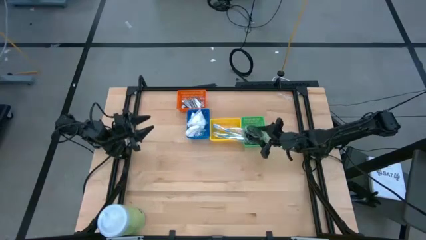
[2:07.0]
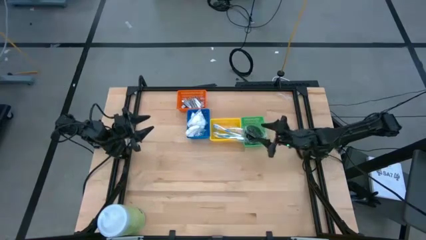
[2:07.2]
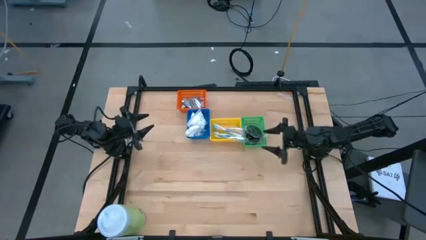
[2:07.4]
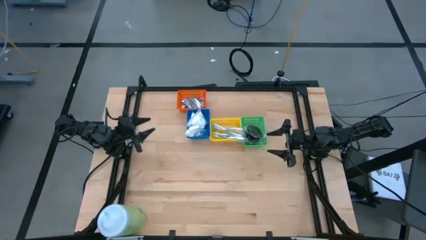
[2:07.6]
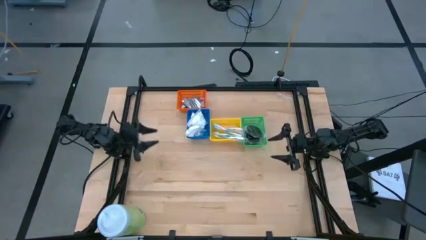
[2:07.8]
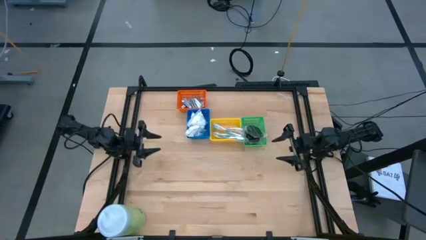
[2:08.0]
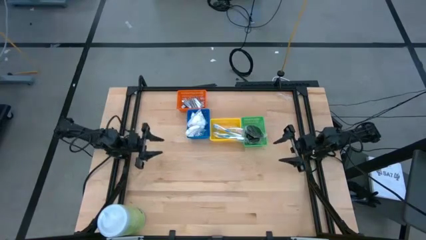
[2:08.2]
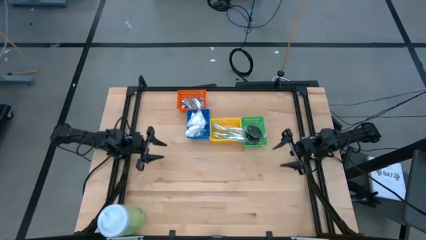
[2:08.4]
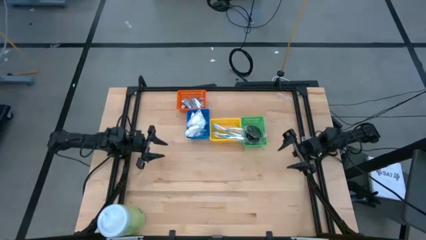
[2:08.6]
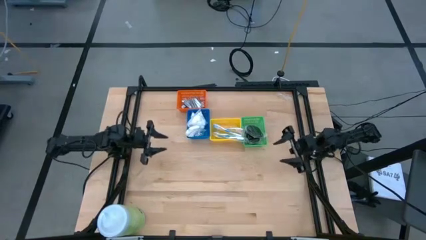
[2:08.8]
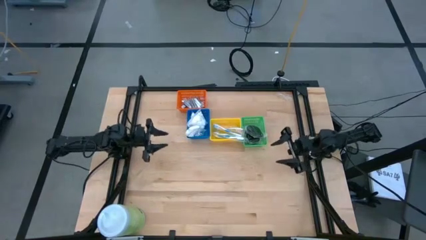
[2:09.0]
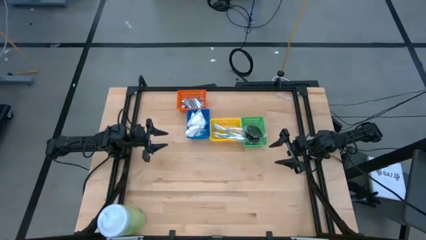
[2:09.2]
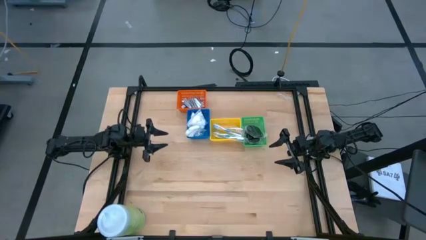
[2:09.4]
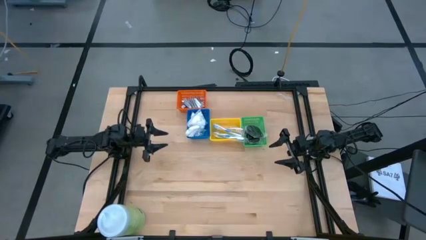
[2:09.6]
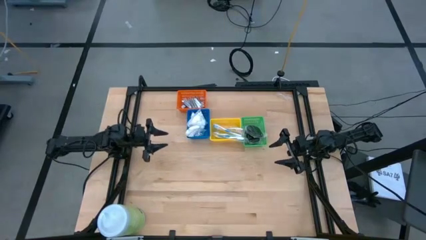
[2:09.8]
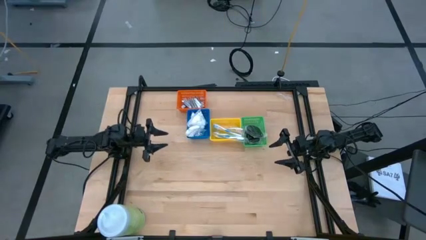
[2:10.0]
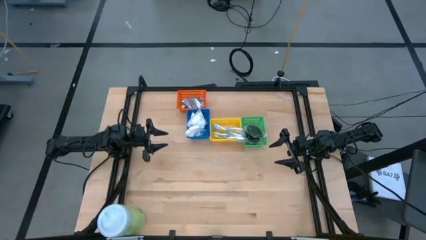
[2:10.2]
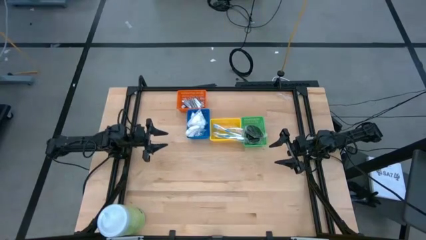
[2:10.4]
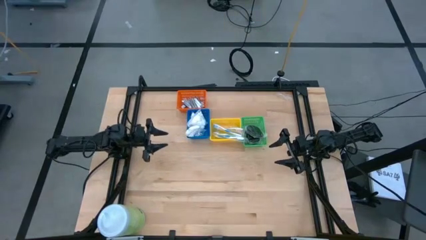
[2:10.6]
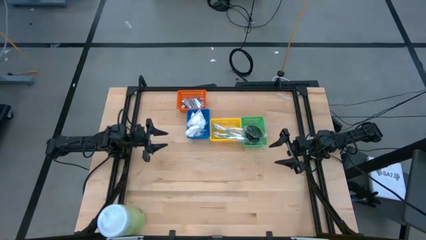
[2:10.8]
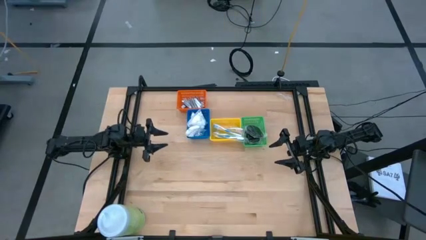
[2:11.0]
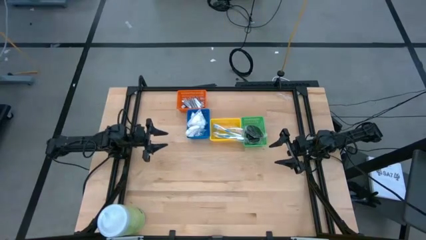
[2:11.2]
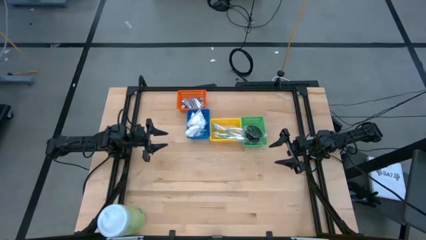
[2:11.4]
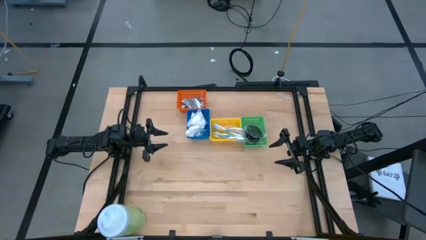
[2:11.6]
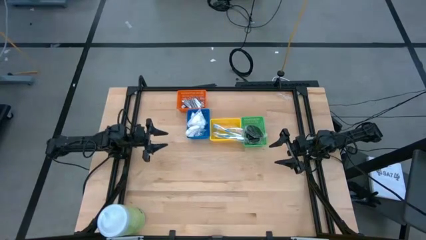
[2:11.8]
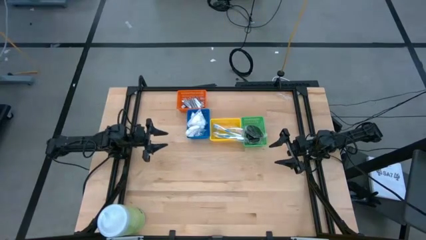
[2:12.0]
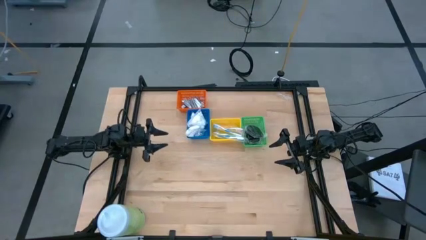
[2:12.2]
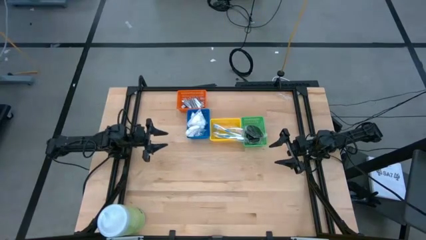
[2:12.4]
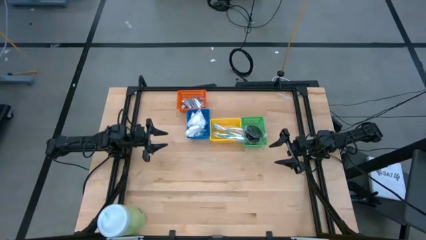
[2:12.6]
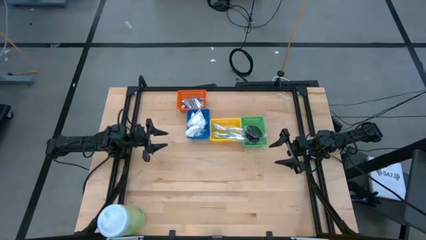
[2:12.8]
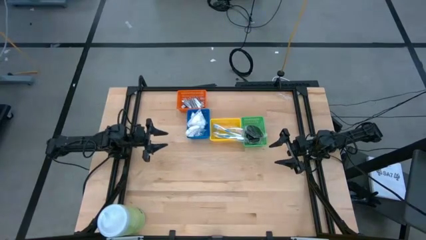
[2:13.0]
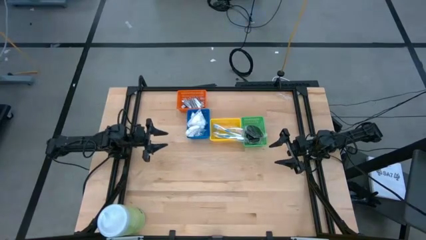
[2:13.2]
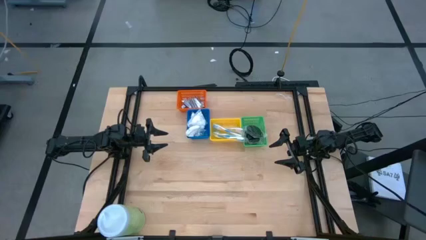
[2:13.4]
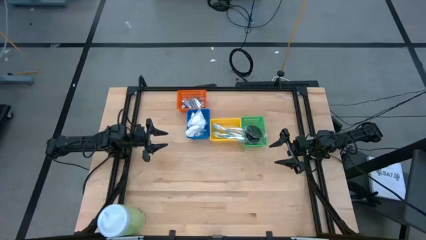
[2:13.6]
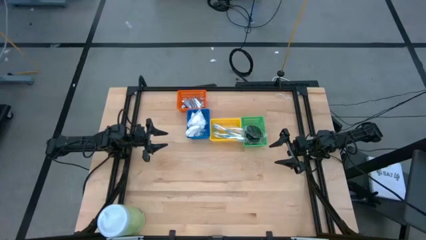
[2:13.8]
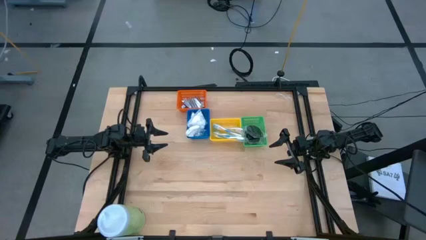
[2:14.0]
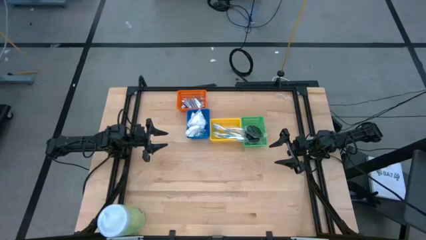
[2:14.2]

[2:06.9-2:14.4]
Task: Pick & Place Travel size toiletries
Return to Home position

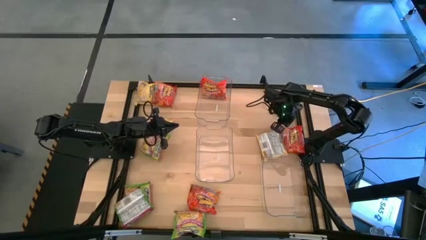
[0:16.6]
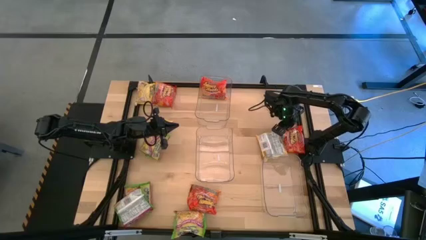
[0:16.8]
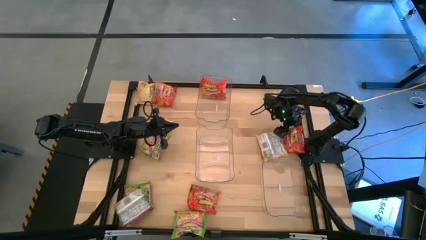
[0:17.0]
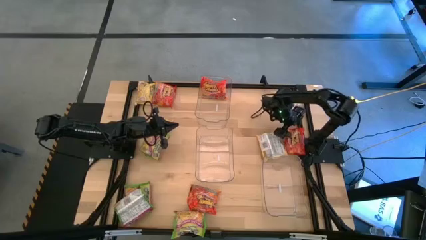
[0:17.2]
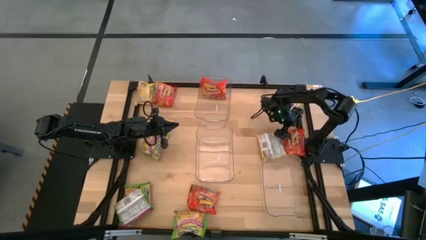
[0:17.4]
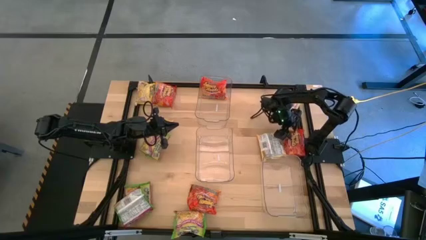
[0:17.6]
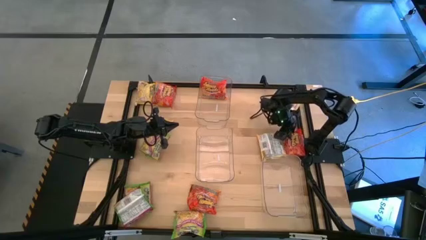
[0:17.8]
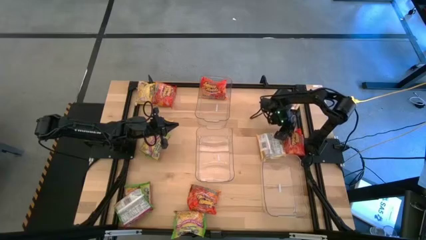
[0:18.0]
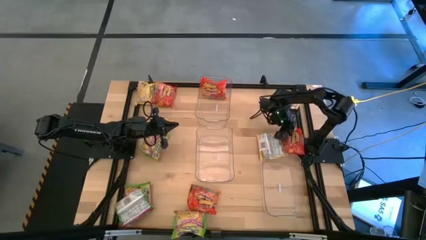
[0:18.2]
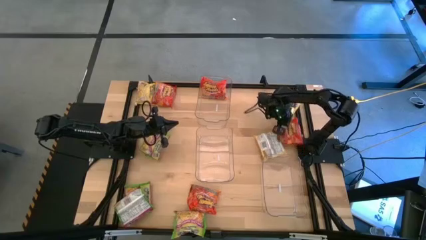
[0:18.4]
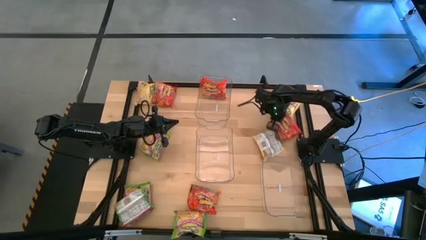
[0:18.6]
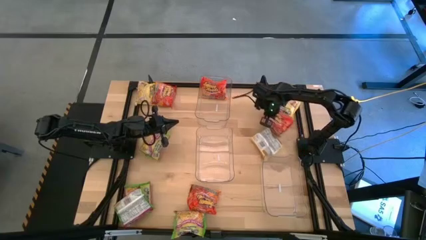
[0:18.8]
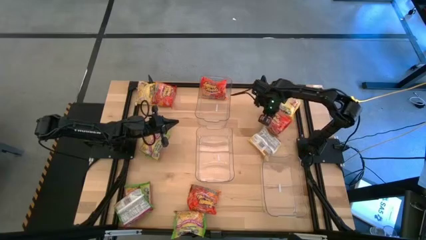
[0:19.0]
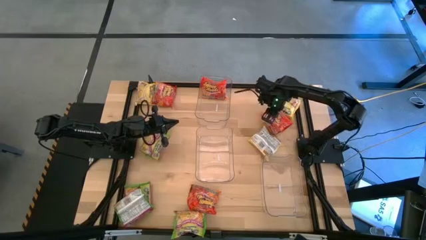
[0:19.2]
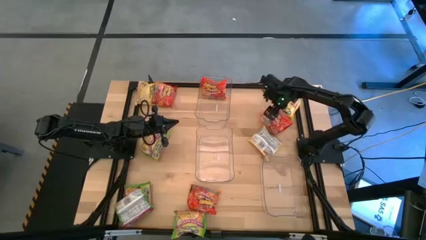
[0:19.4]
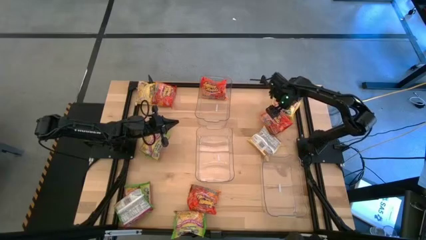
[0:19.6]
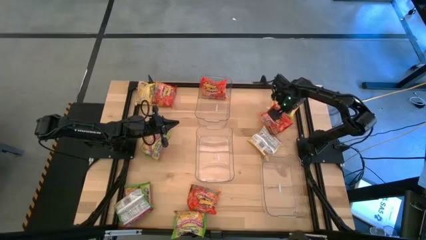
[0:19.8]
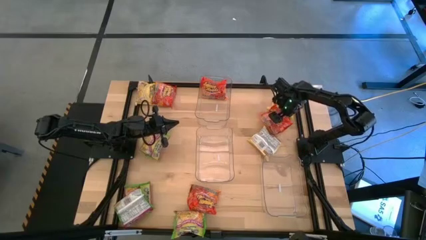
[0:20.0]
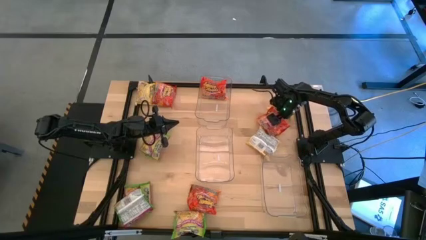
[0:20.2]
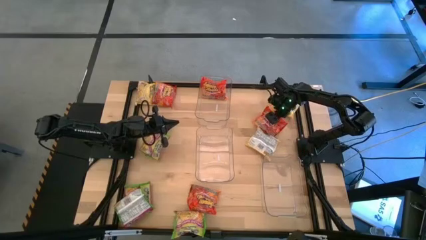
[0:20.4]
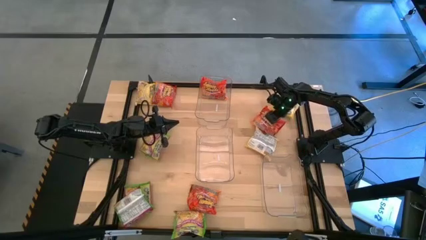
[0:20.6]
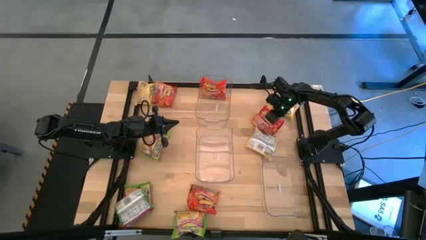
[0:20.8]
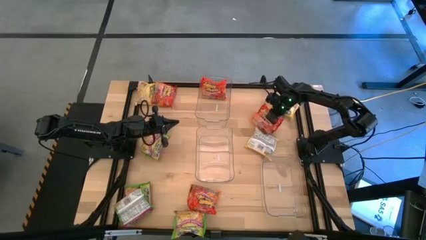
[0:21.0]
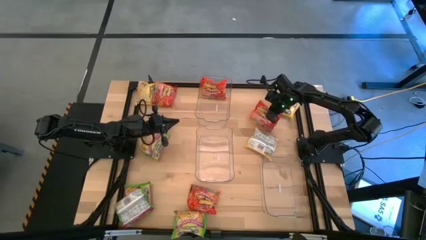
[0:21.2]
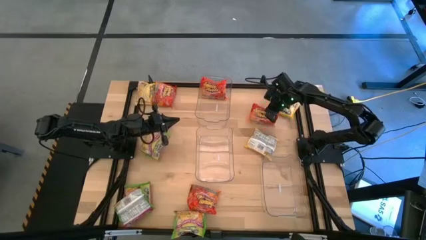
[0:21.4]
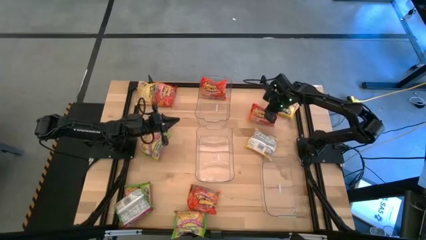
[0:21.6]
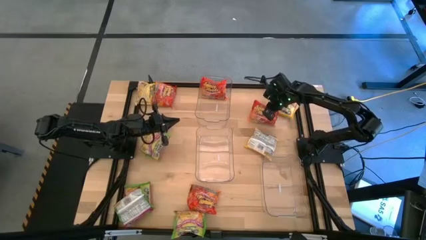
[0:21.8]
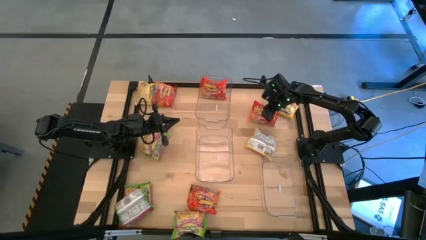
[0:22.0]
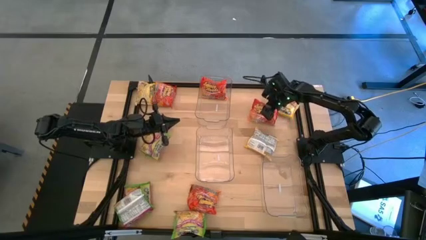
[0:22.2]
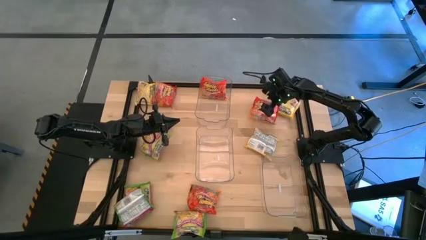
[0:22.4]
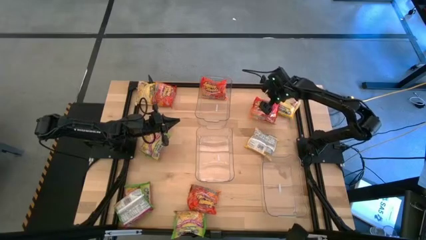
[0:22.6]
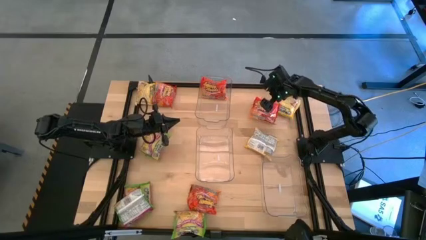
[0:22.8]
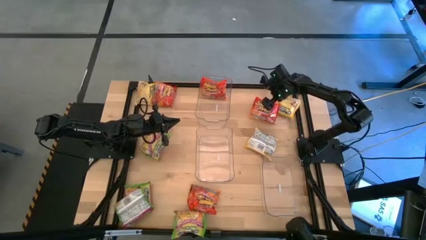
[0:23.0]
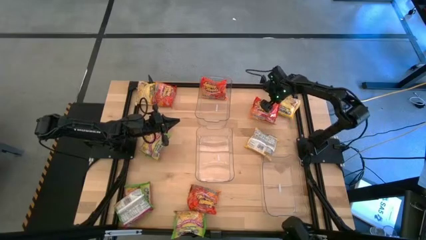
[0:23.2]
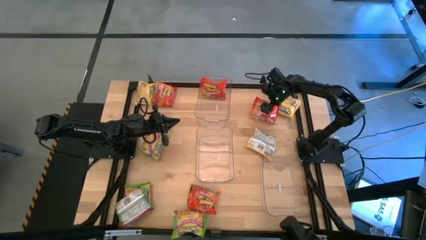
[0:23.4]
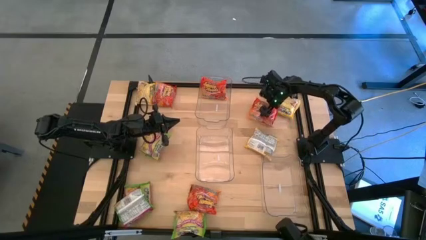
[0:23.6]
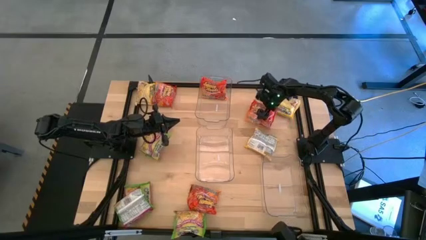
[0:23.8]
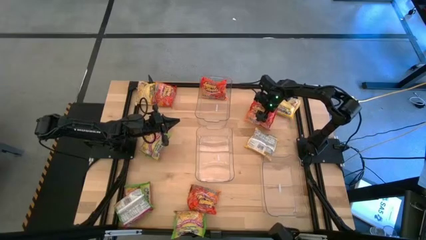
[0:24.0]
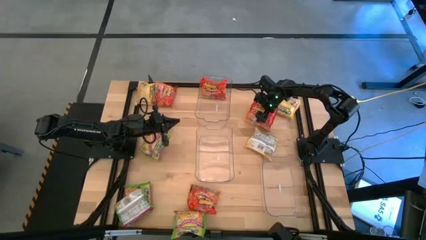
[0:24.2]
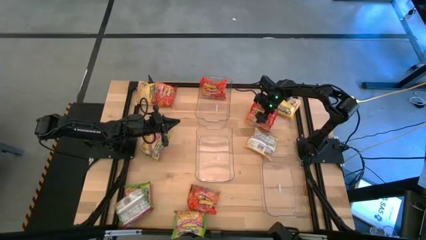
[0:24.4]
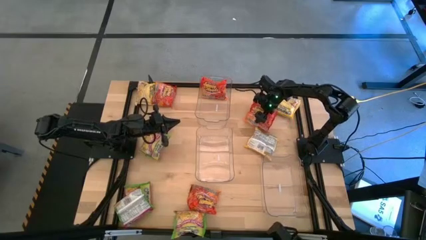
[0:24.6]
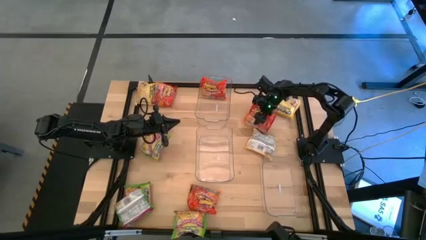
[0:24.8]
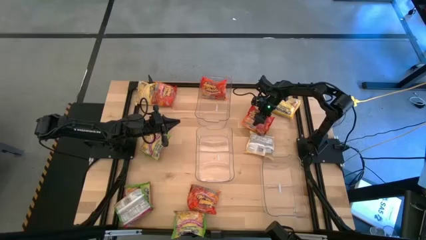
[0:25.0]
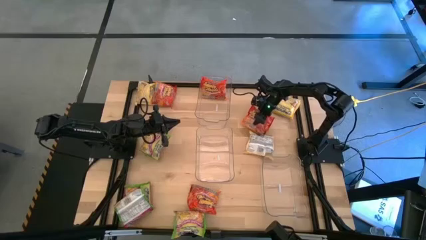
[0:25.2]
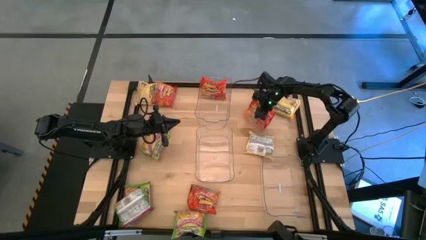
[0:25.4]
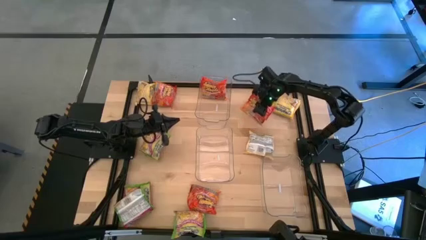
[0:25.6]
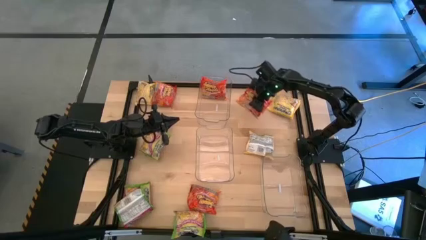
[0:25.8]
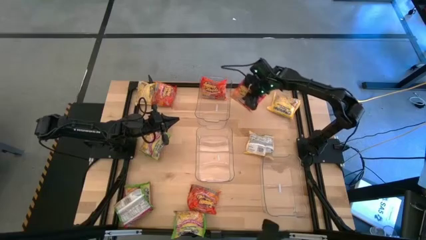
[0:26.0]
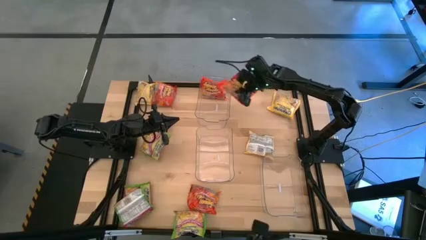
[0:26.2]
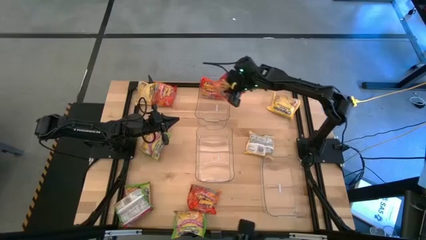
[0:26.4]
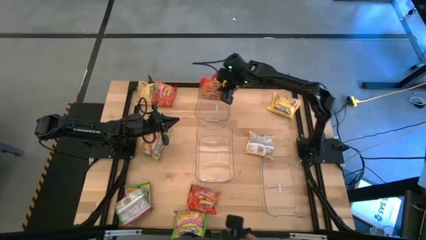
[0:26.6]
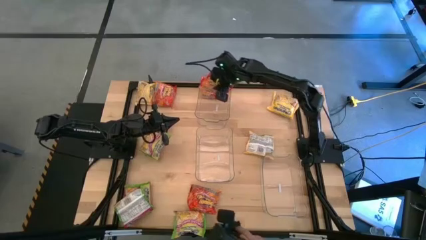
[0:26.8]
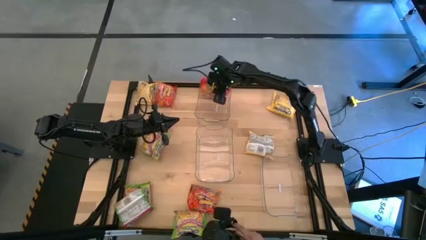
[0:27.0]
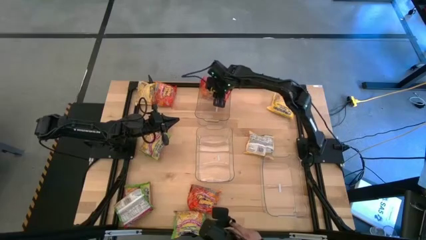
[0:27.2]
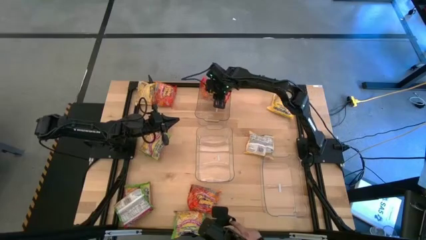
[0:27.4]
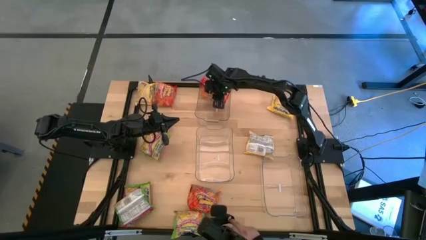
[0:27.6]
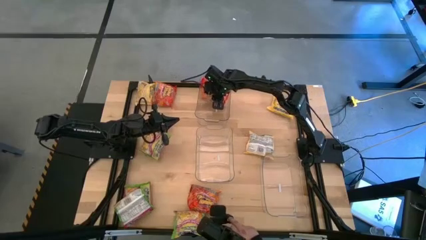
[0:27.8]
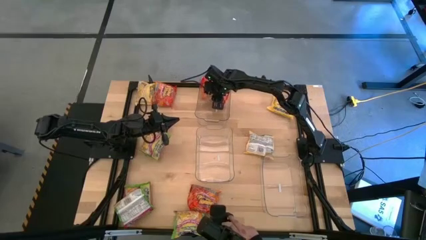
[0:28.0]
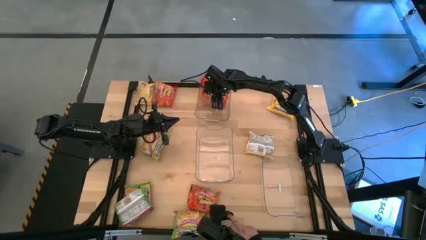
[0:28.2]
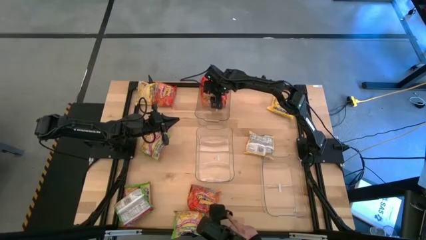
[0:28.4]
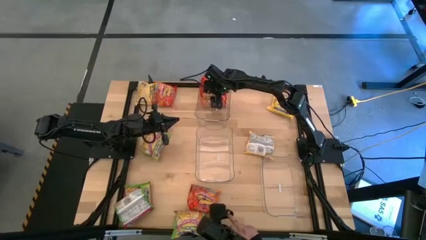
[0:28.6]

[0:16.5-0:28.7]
Task: Sort Maruchan noodles
Put the orange noodle pack into the top transparent bin
